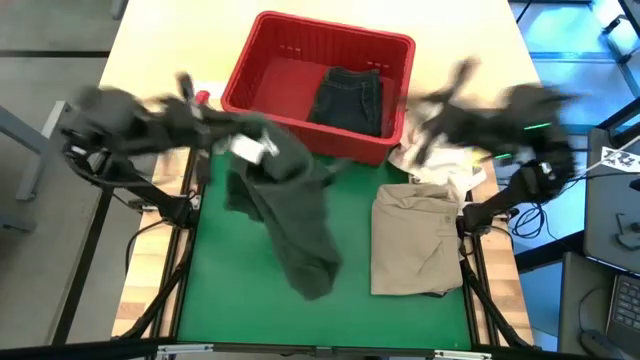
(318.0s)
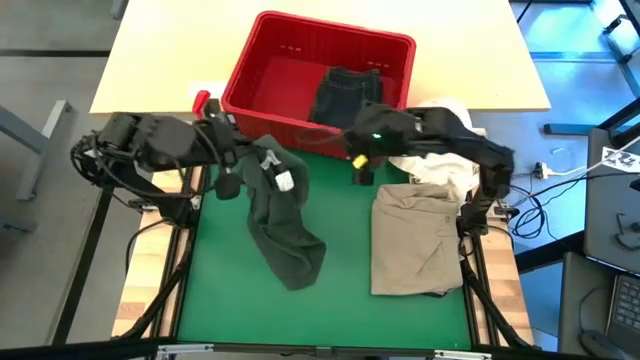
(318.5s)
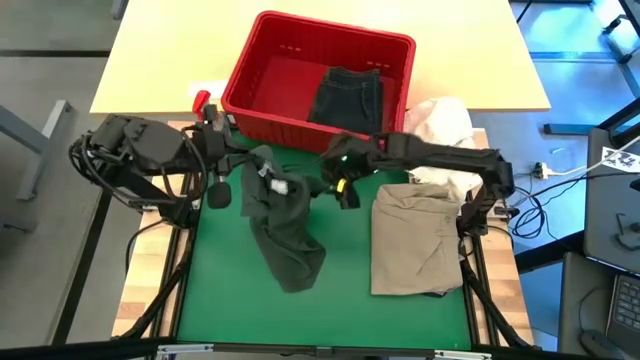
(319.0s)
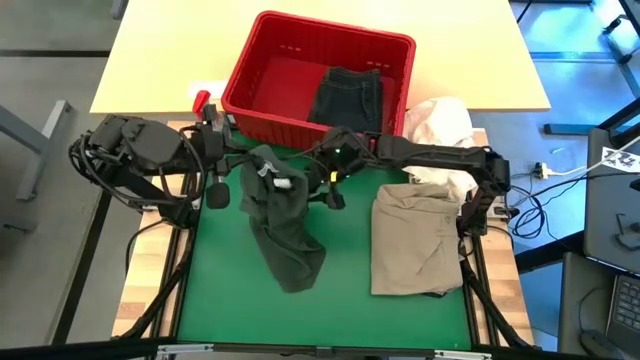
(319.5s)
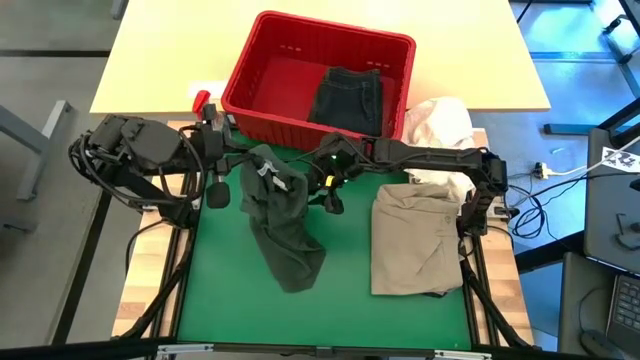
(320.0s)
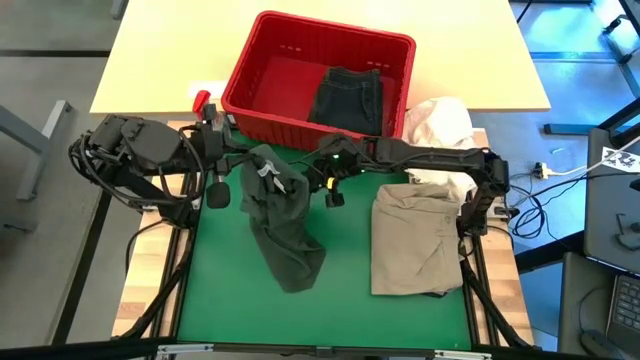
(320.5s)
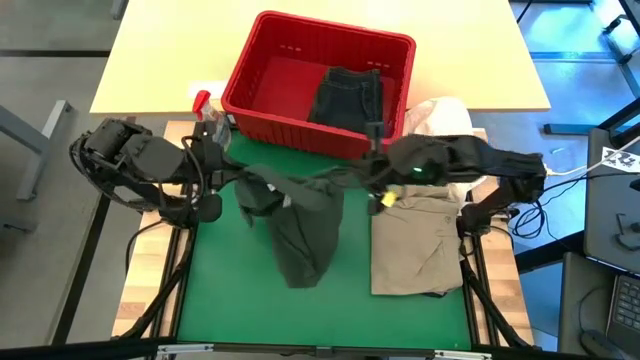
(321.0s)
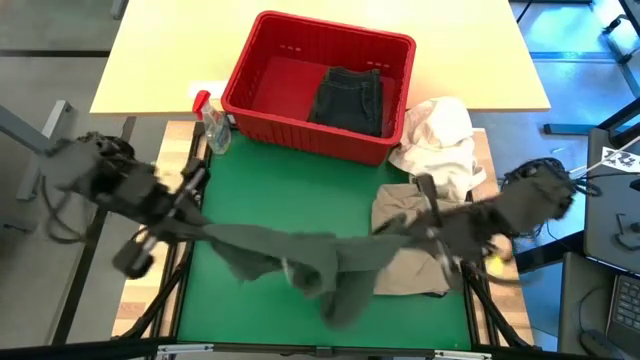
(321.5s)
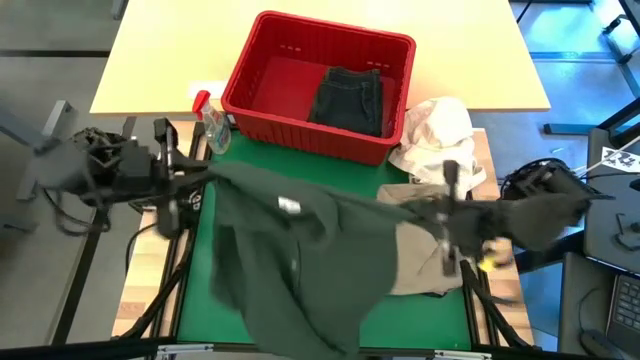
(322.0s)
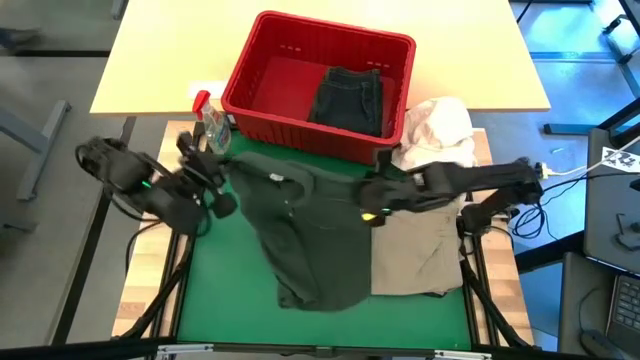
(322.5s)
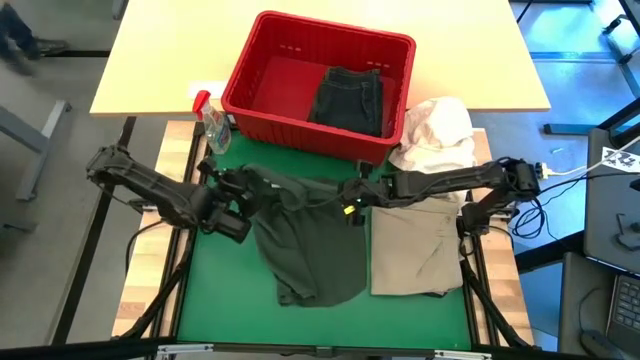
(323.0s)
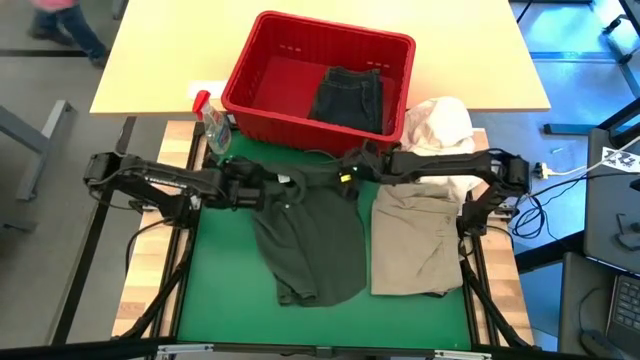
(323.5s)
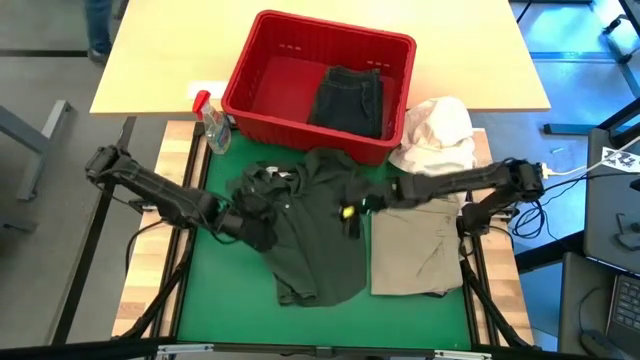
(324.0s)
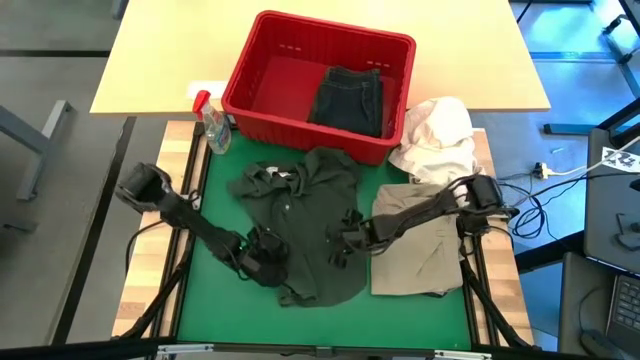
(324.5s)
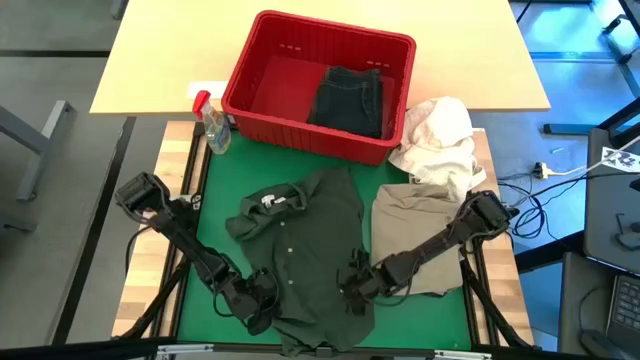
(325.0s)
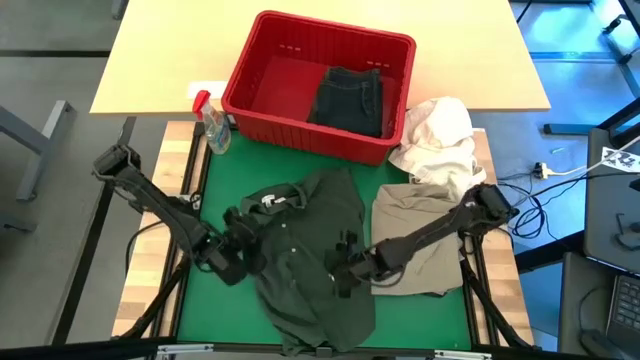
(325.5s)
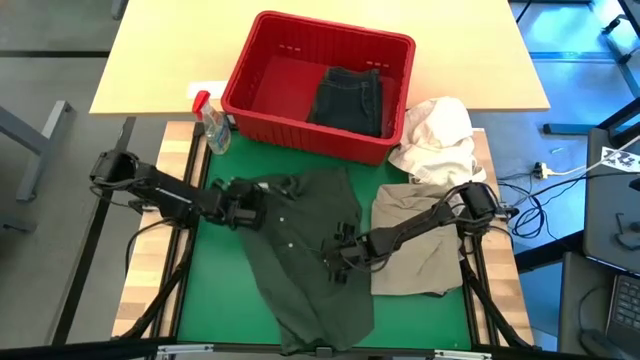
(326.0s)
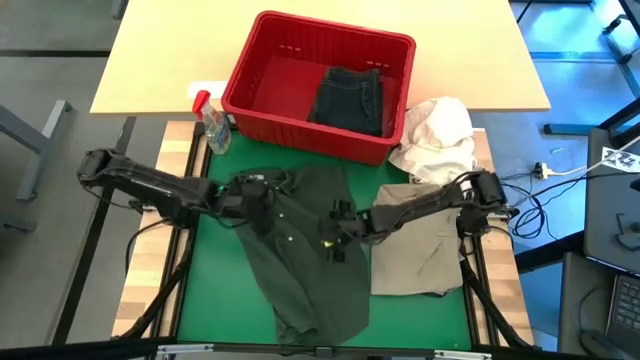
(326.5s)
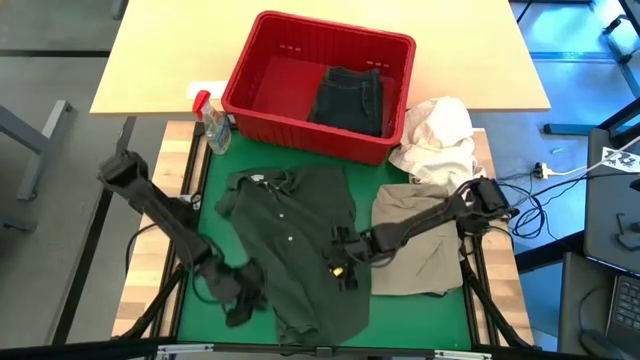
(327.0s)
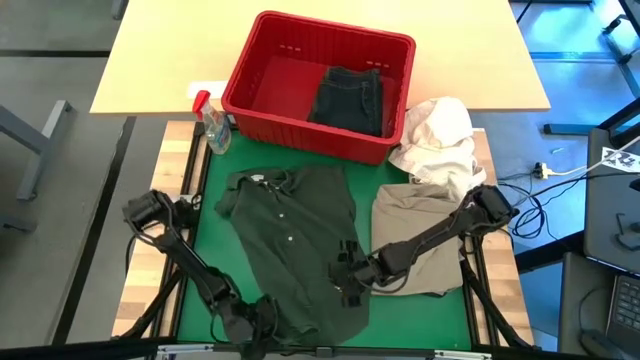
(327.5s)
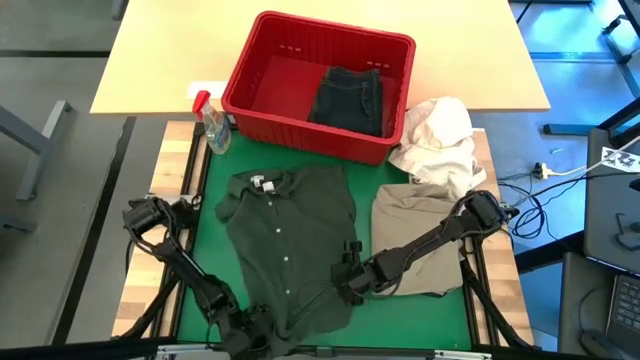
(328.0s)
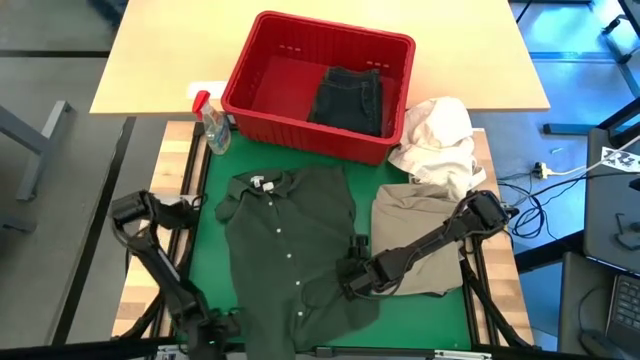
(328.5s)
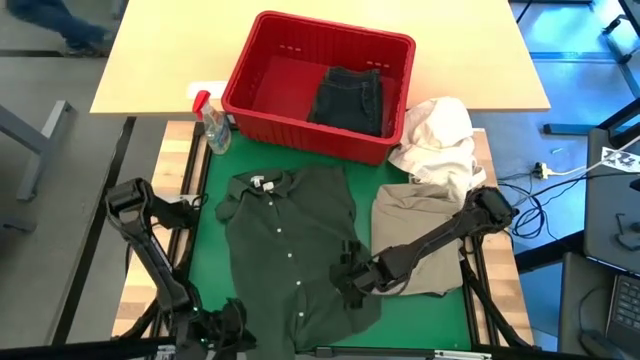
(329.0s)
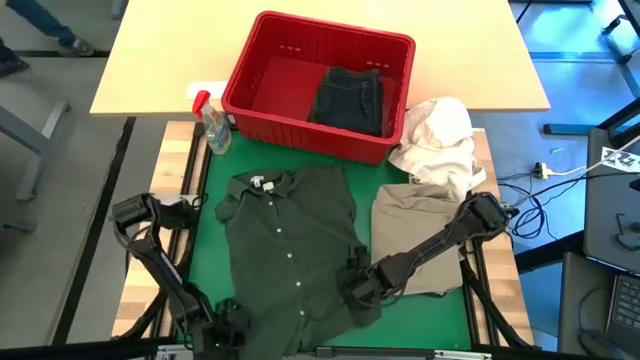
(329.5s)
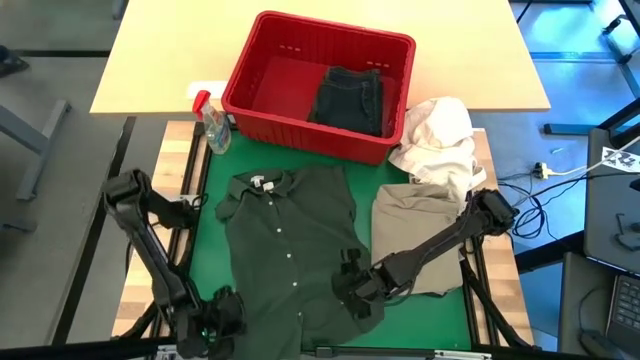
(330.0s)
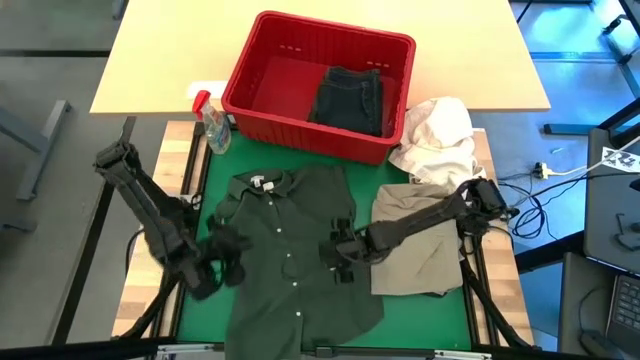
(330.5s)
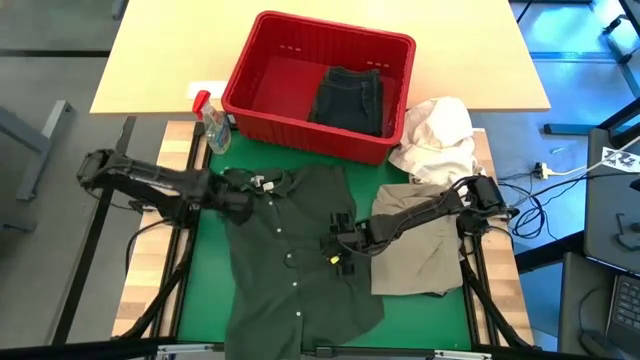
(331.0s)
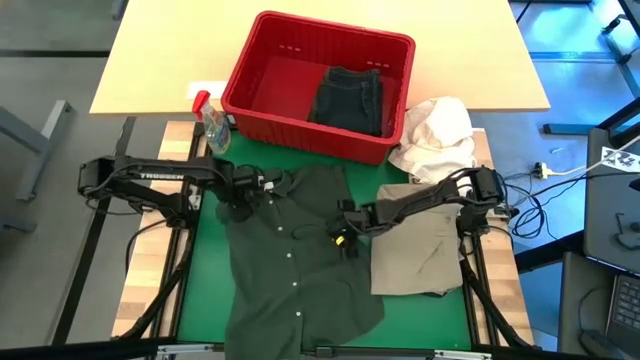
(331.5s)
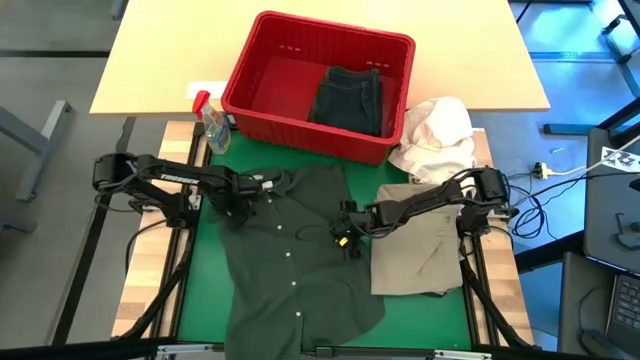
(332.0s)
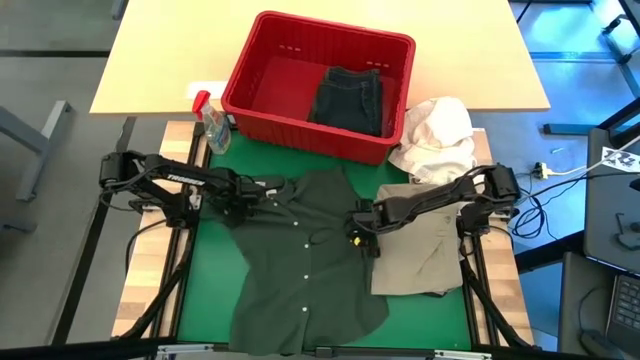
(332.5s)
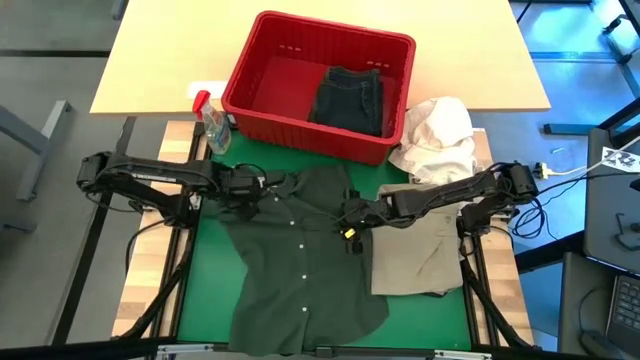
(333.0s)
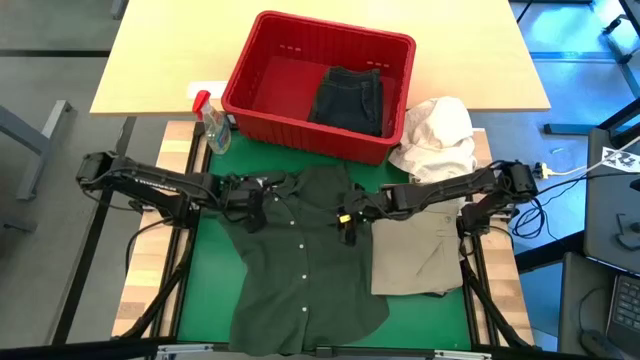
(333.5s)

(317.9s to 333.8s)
Task: Fold Laundry from Bin
Fold the green polo shirt

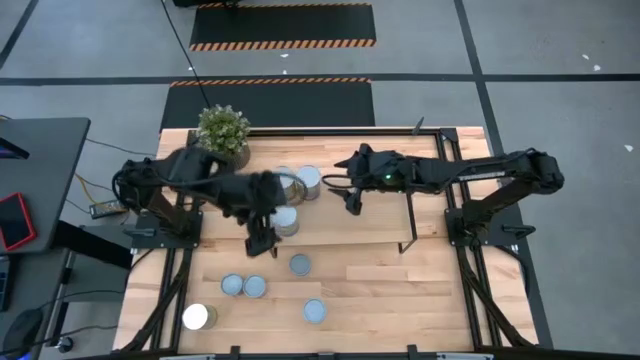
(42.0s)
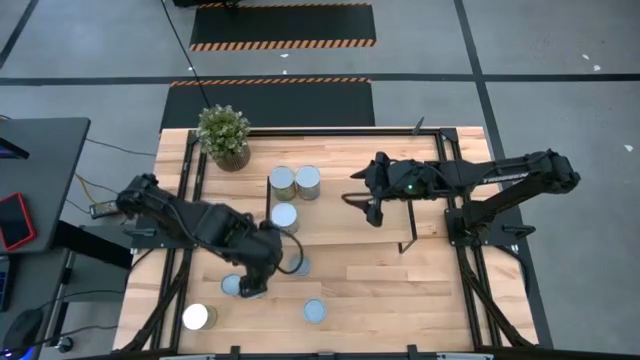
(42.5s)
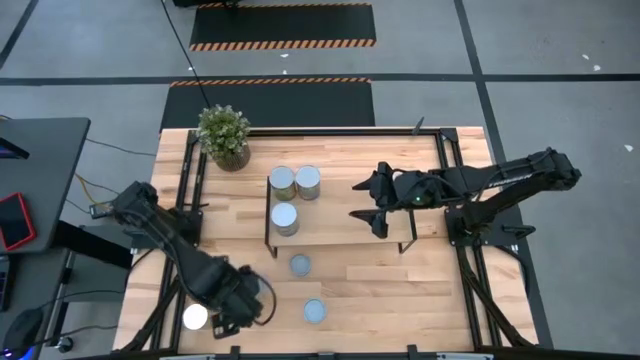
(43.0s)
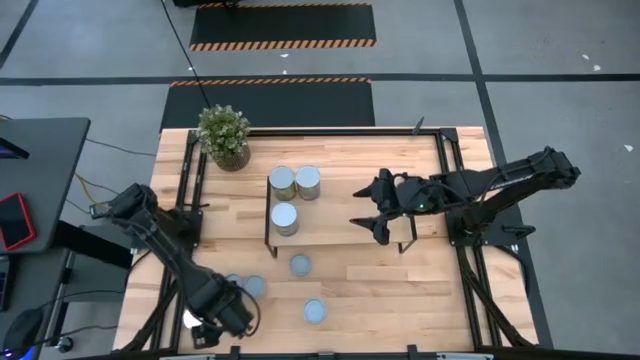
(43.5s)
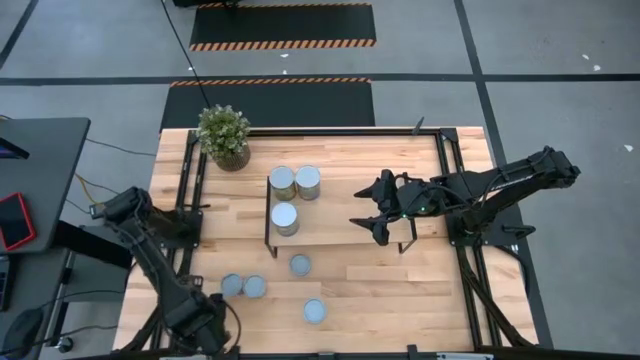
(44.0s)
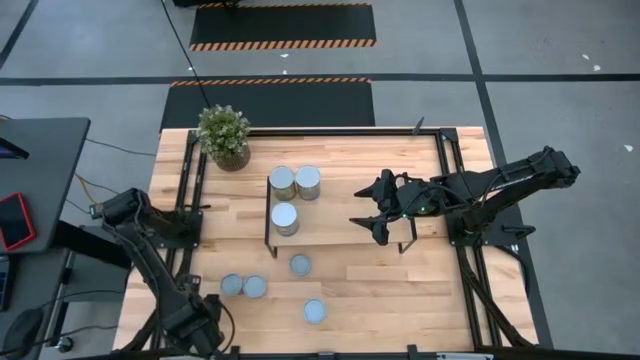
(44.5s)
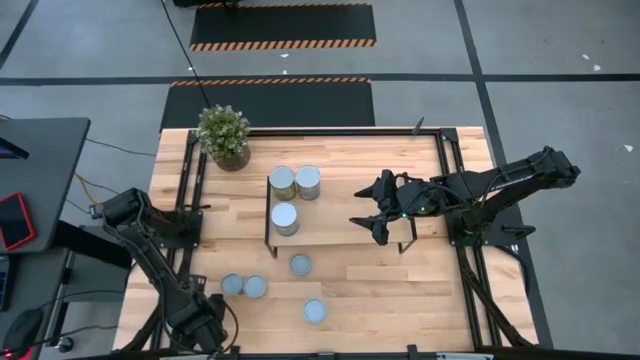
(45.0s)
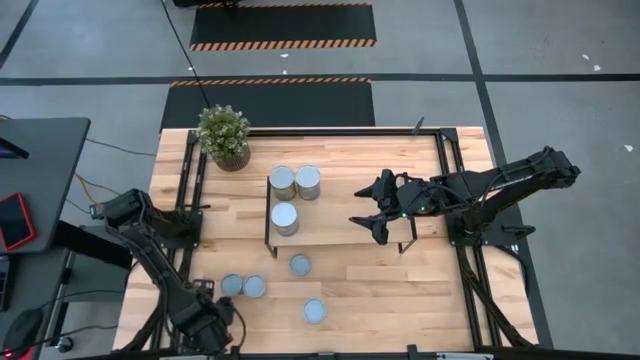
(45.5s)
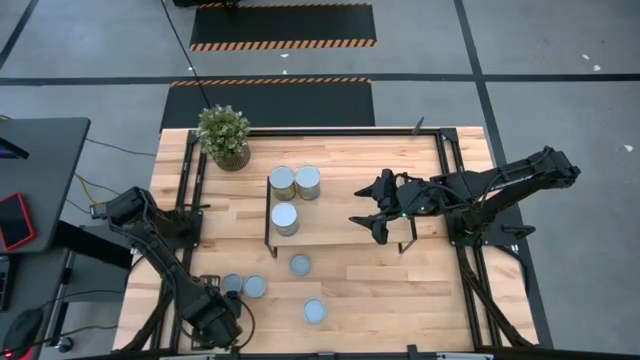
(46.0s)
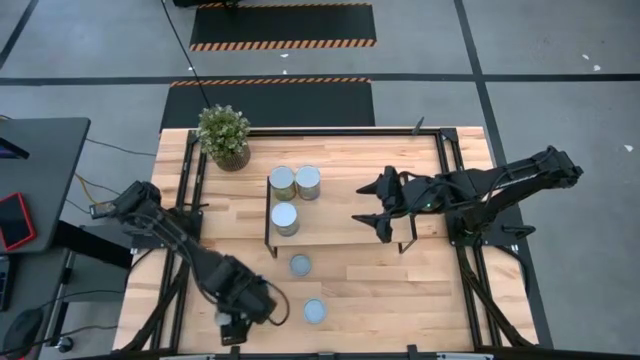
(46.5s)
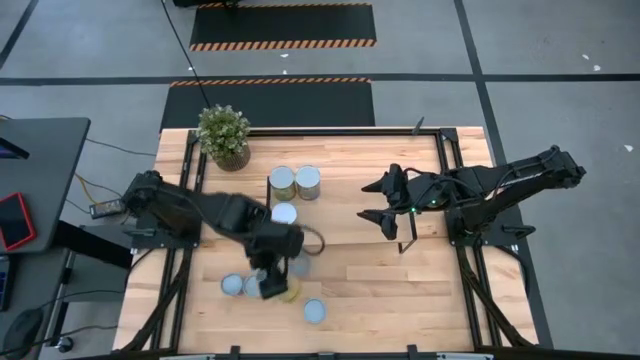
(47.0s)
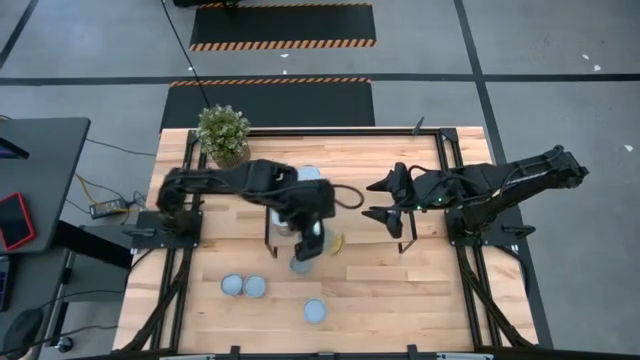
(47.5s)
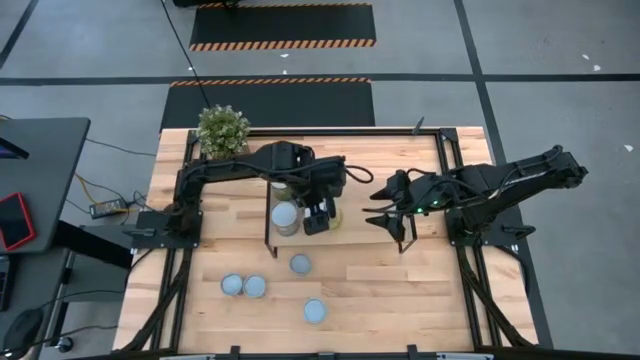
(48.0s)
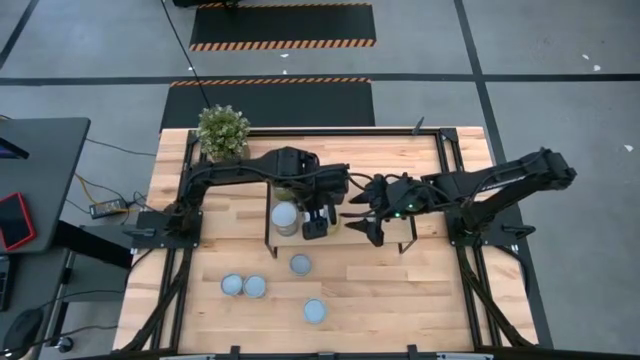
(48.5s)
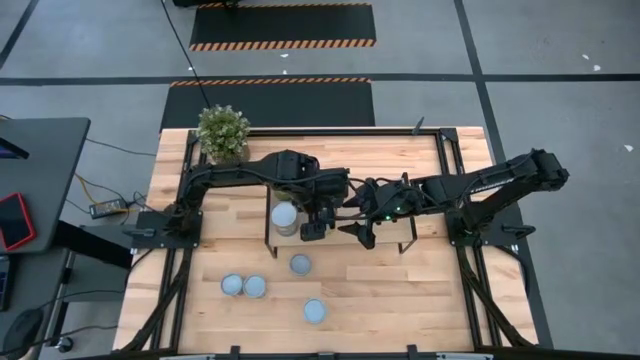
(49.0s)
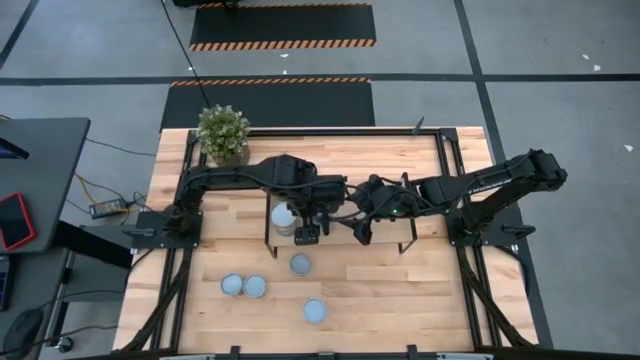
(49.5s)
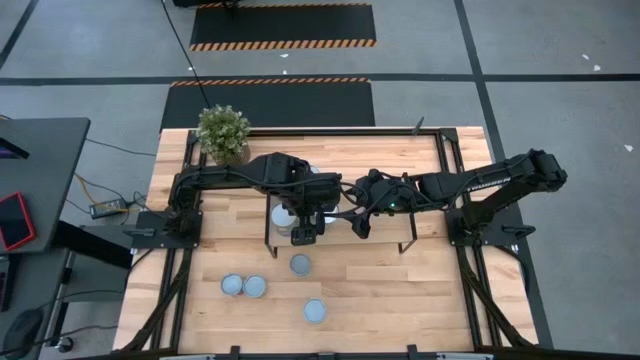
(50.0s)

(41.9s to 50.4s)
Task: Pick and place cans onto a shelf
Put the canned carrots on the shelf
